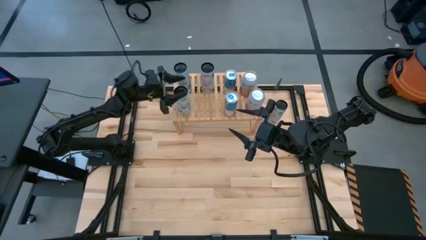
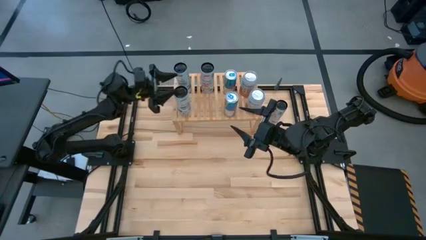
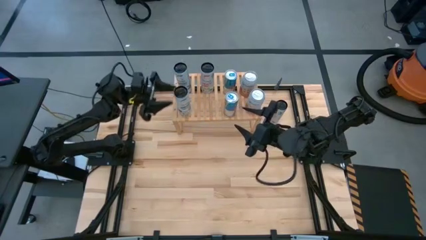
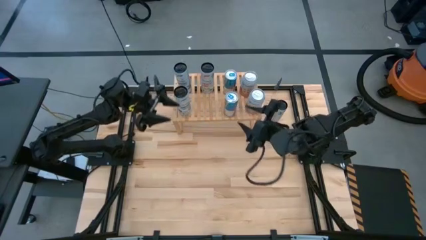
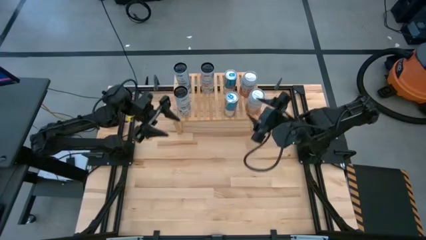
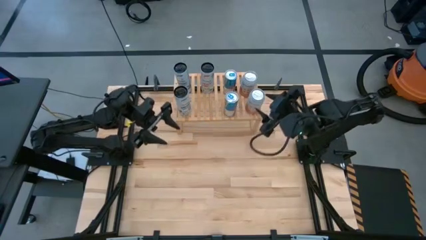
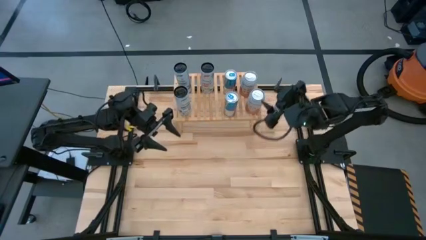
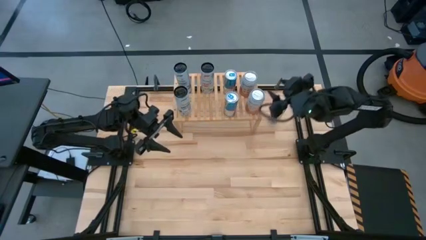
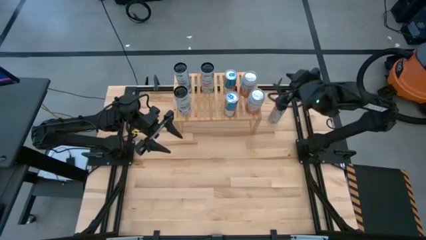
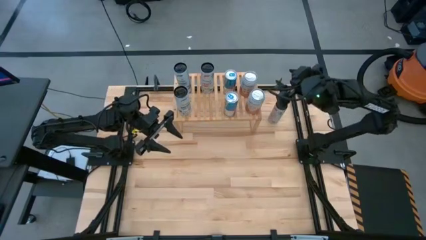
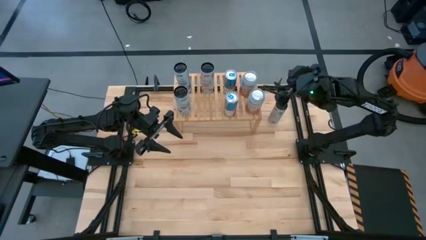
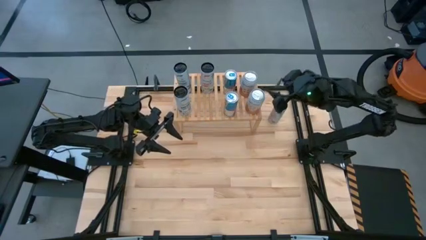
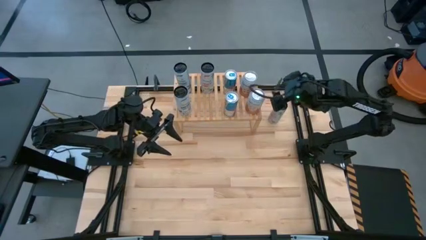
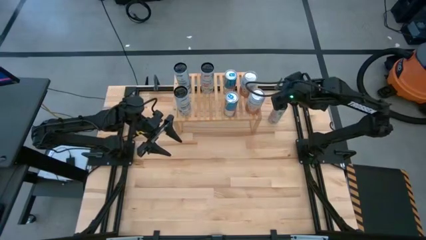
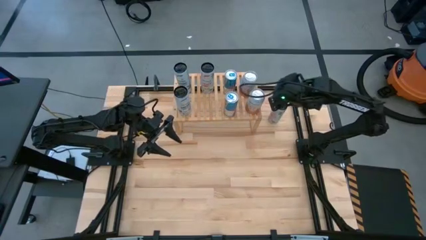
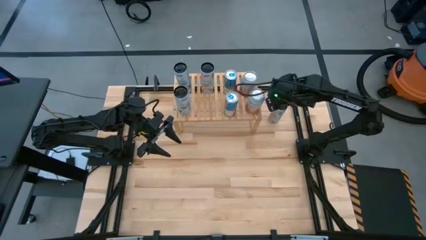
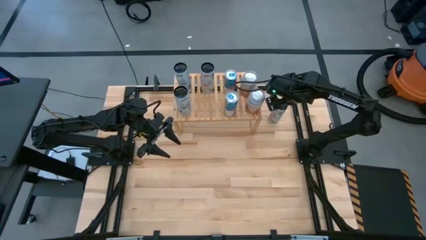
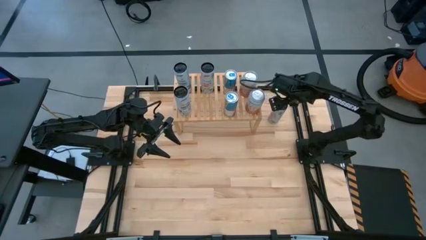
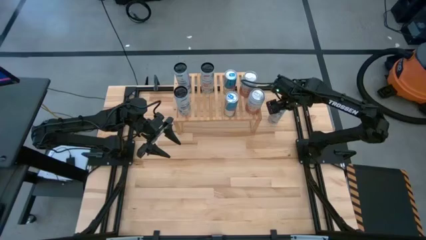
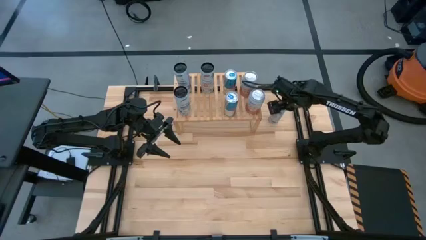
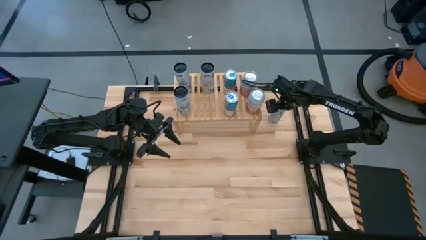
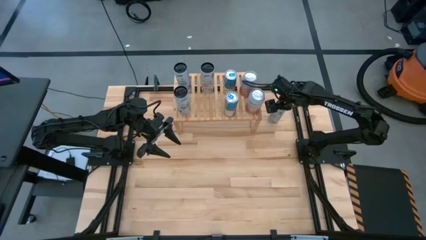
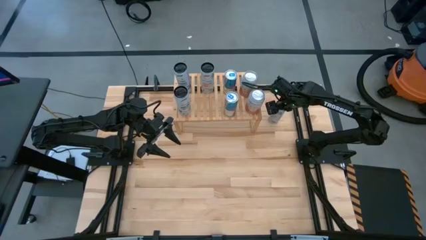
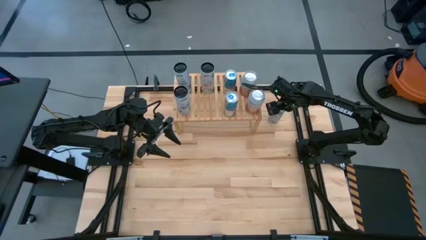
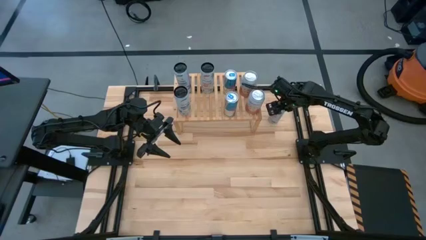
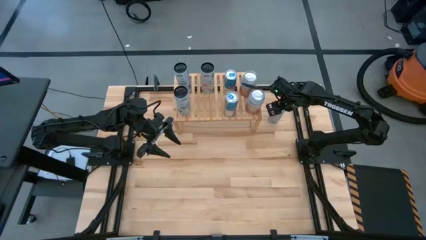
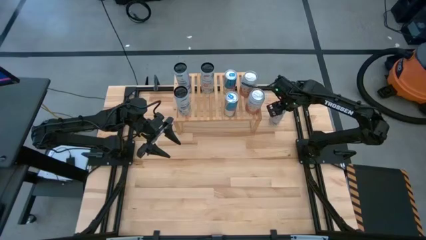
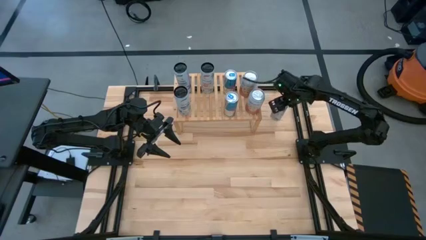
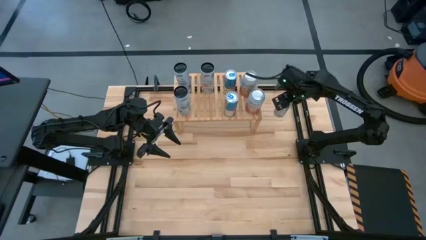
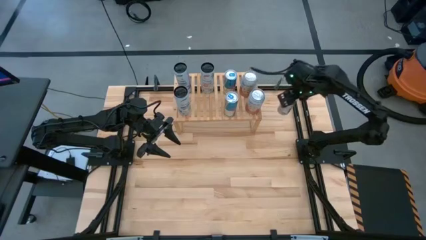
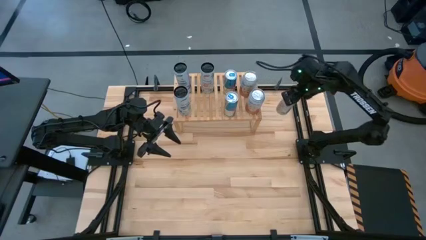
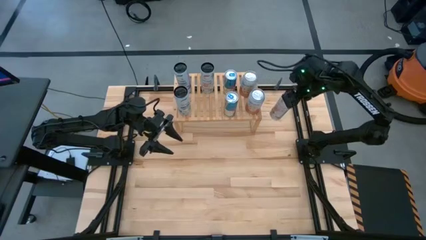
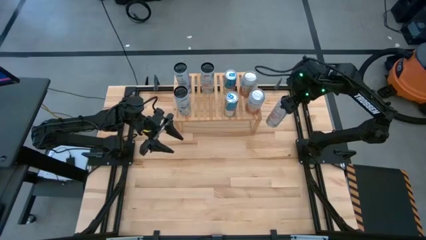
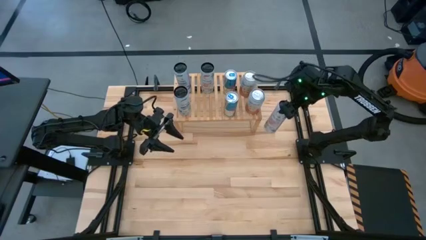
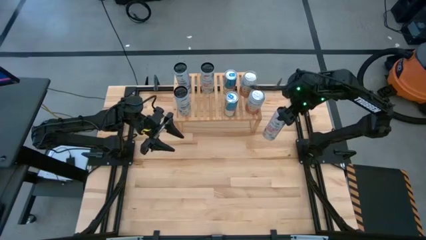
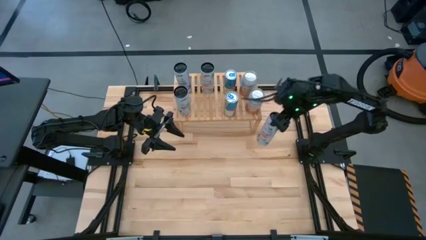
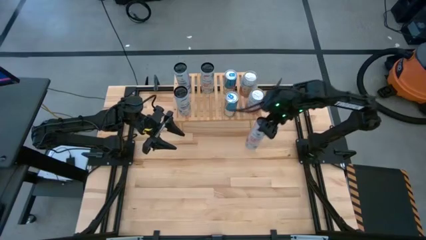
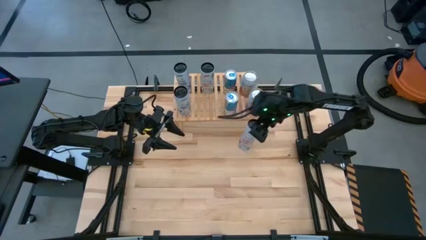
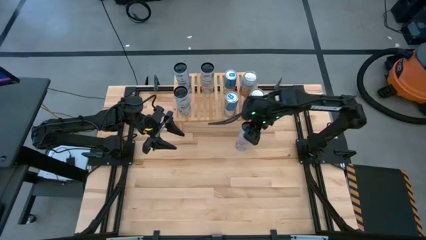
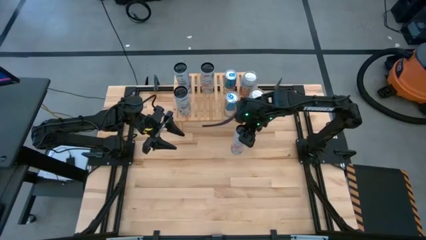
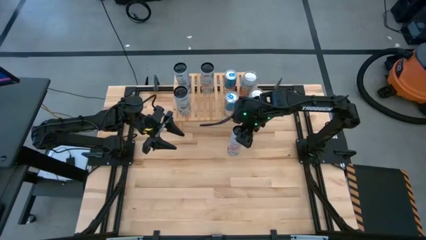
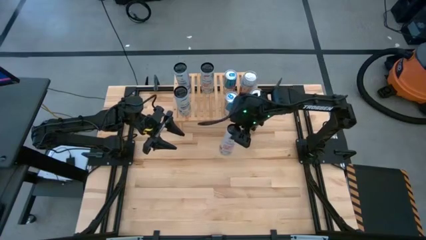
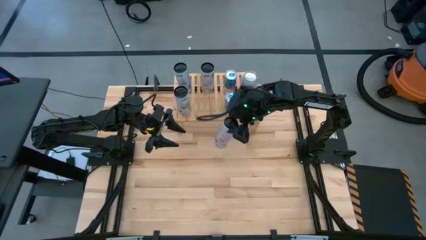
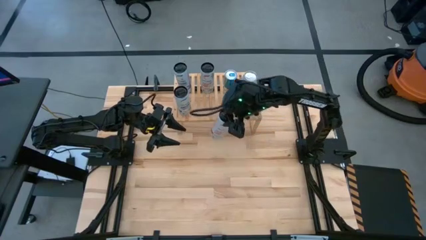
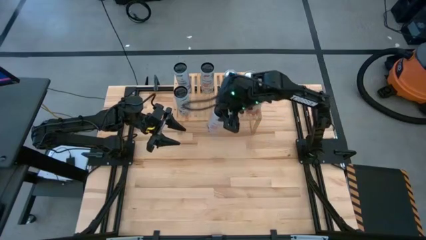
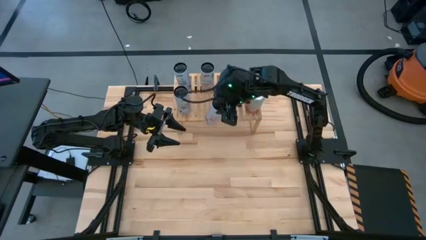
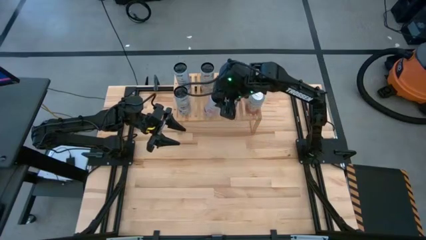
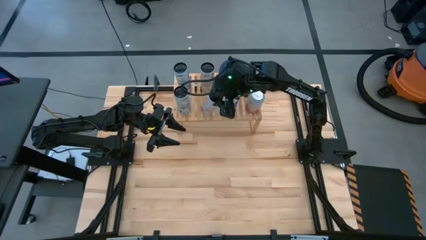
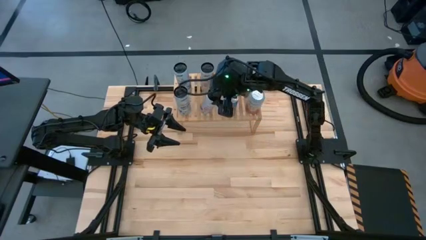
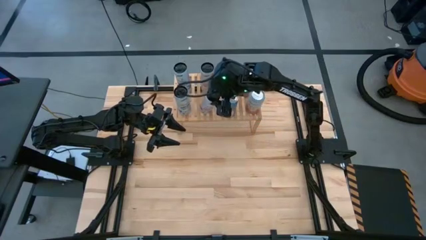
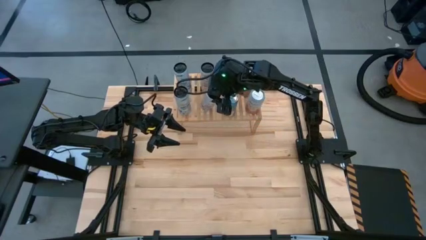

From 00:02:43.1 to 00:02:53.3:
Task: Place canned beverage on shelf
Put the white-pink soda can on the shelf aligned with the other white-pink soda

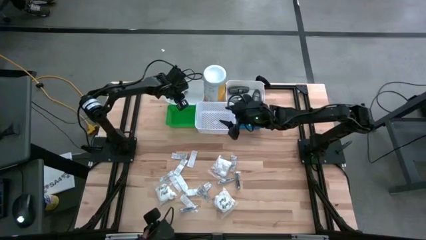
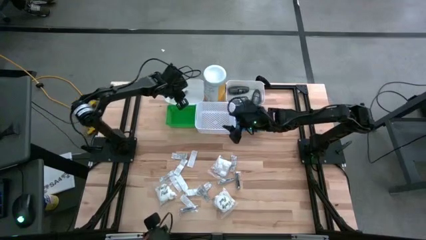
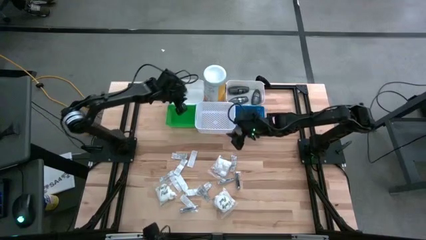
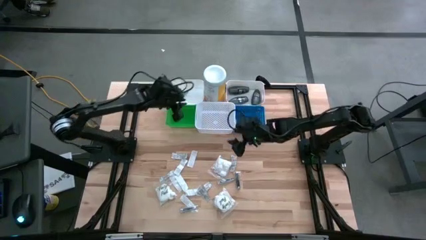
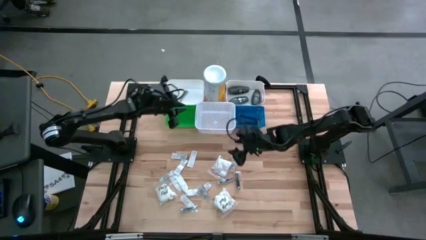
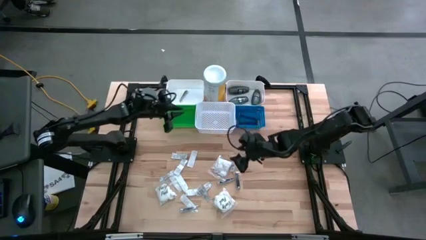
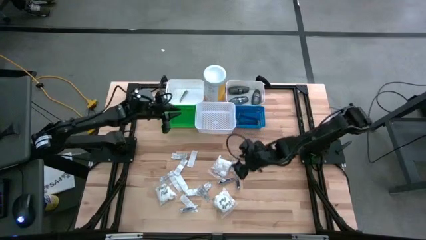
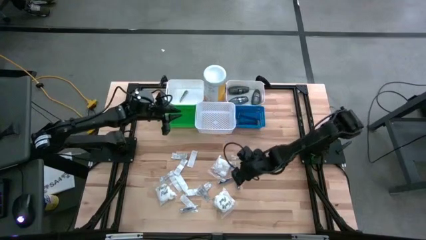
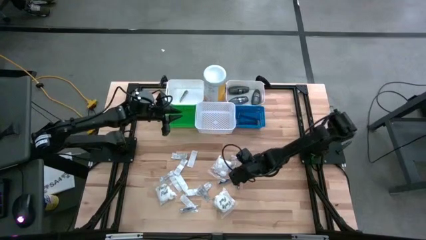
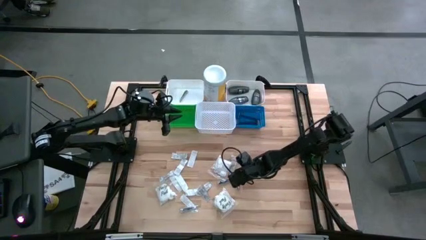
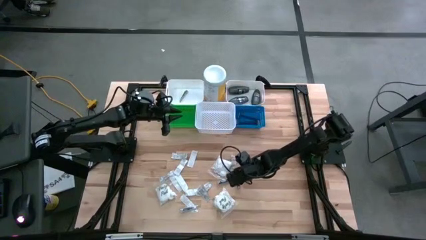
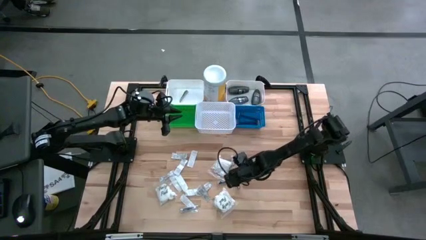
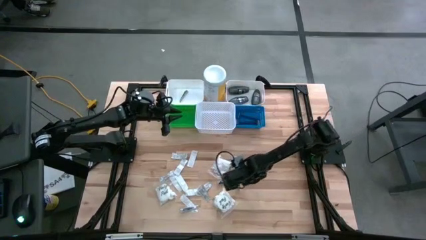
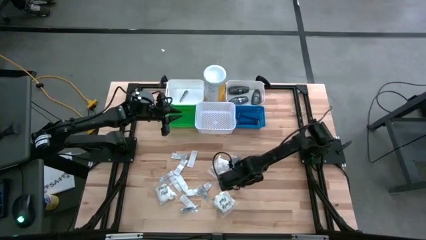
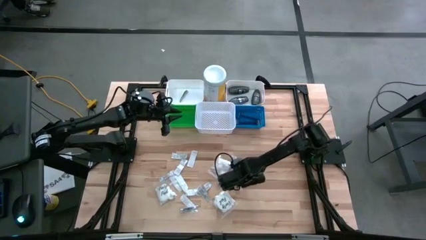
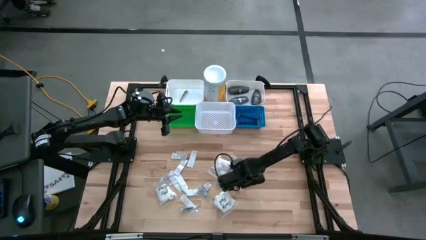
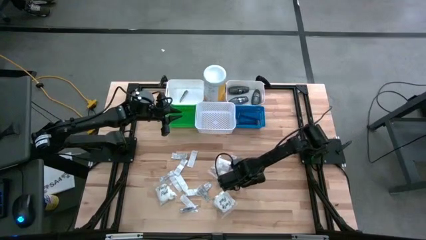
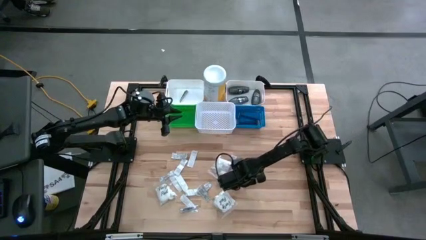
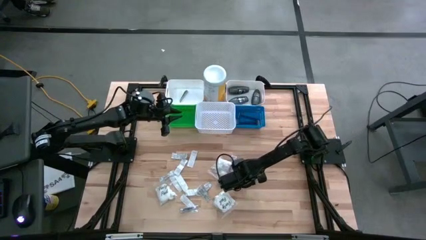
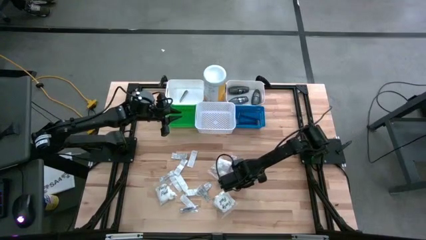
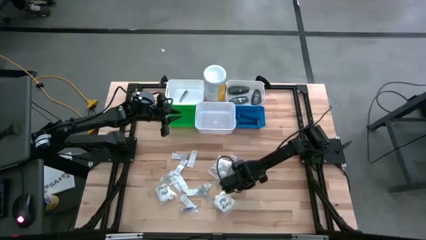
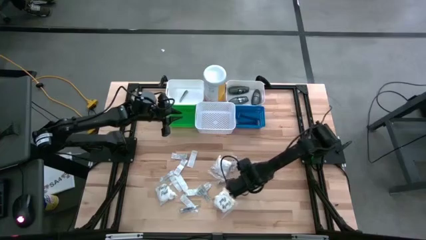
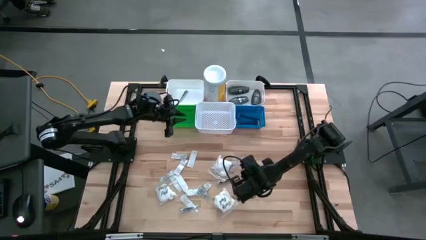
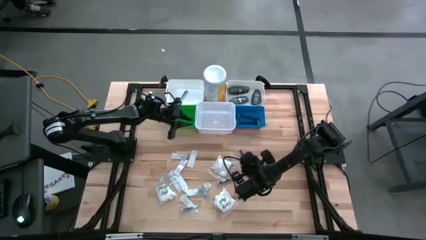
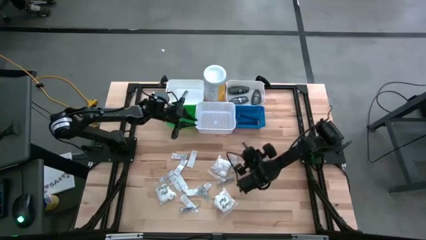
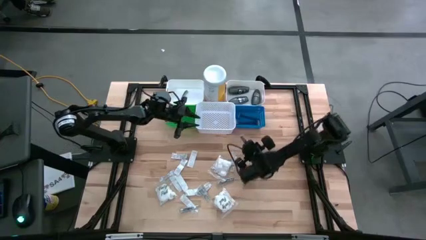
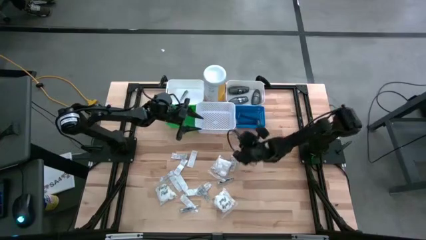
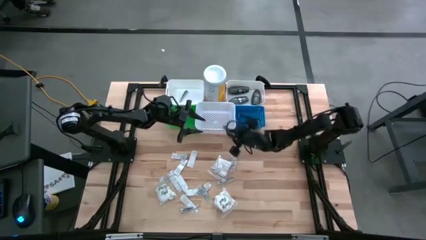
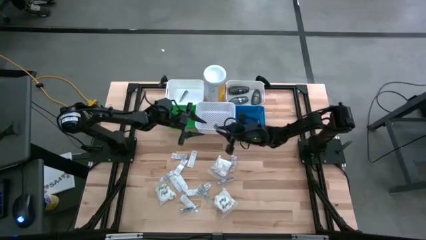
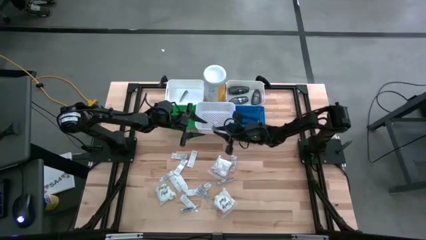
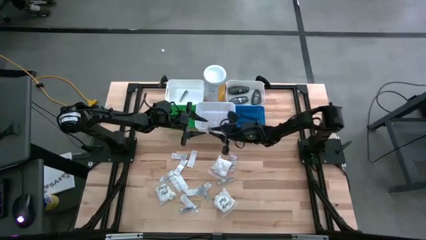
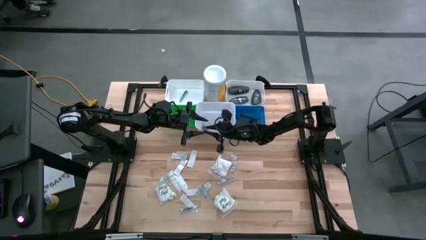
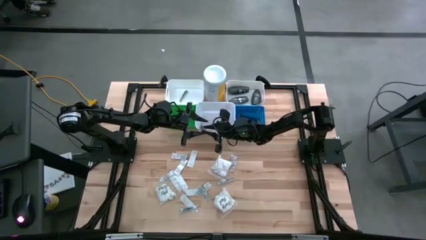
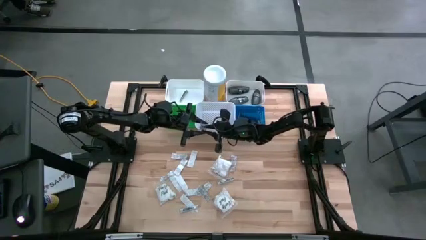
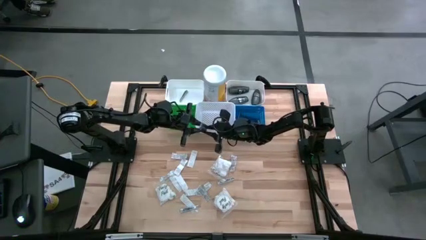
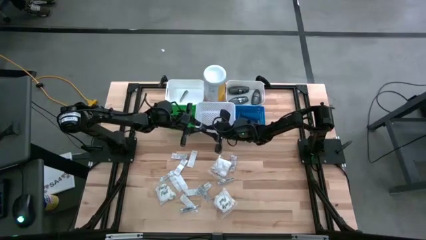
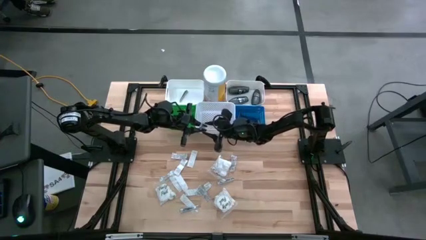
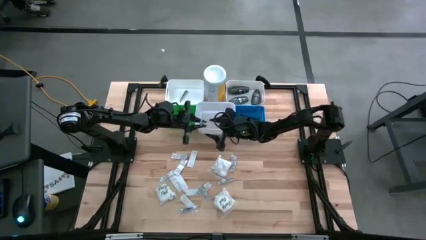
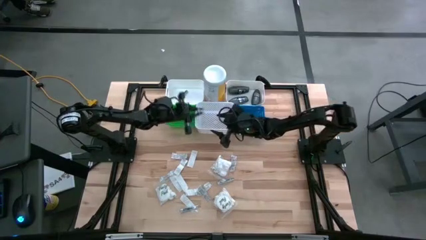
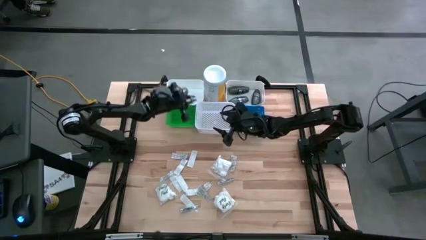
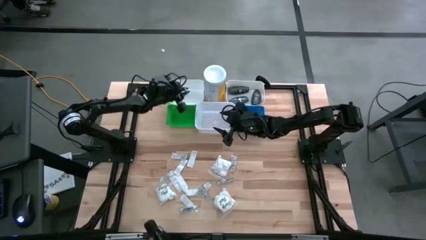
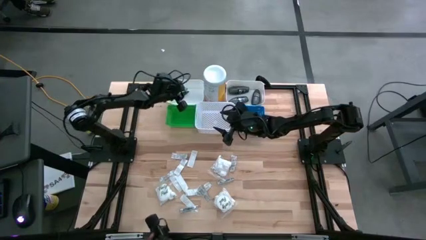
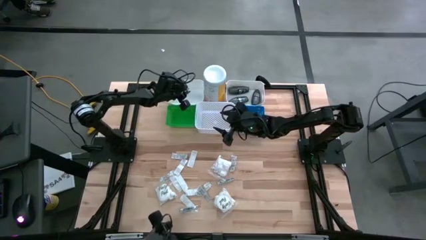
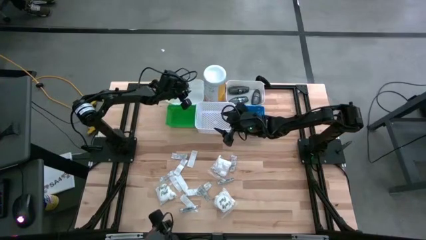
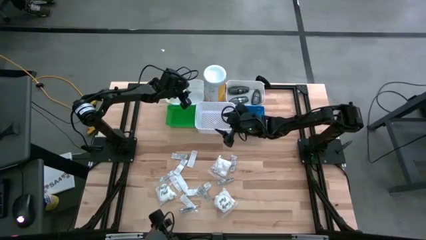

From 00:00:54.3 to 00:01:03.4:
Task: Pick & Place Travel size toiletries
Put the silver nail cutter into the top left white bin
